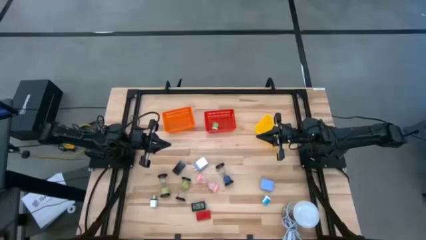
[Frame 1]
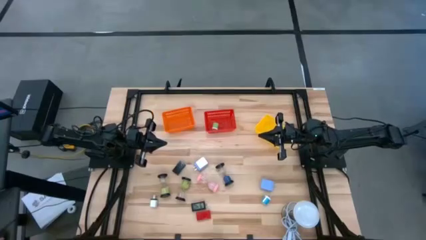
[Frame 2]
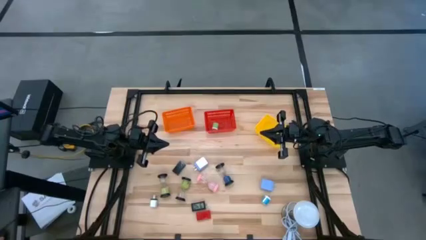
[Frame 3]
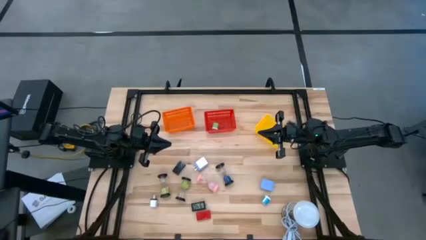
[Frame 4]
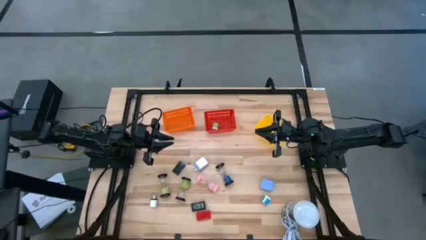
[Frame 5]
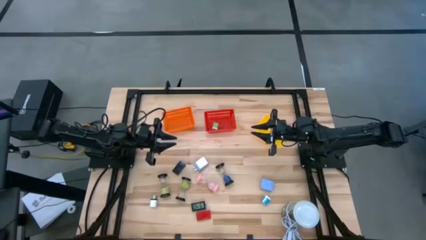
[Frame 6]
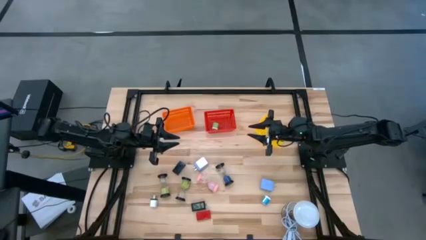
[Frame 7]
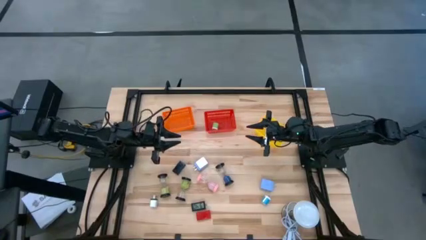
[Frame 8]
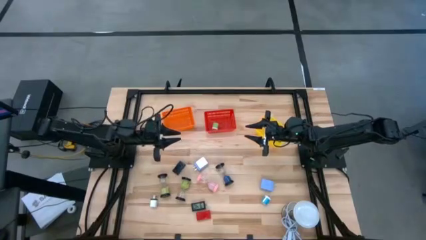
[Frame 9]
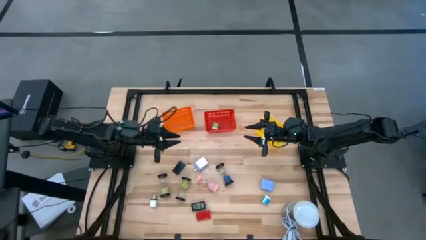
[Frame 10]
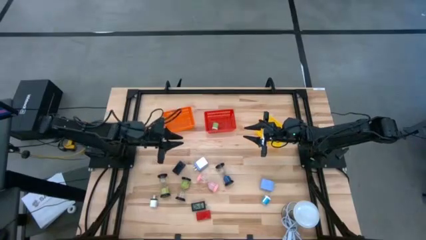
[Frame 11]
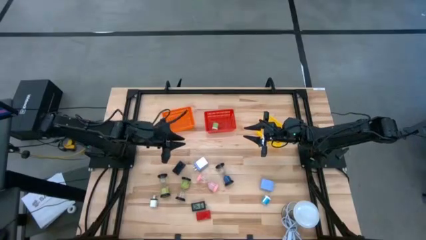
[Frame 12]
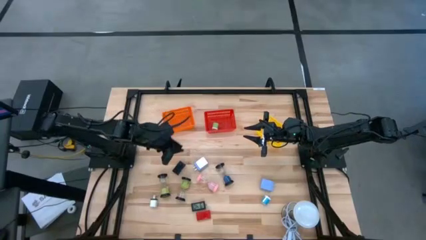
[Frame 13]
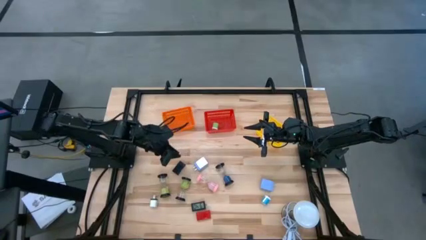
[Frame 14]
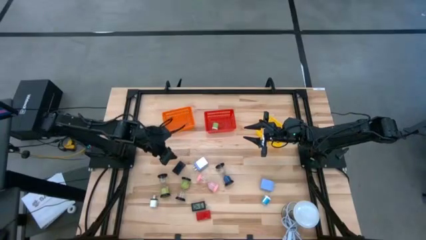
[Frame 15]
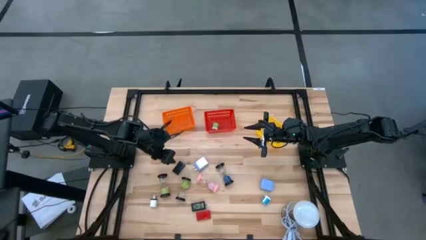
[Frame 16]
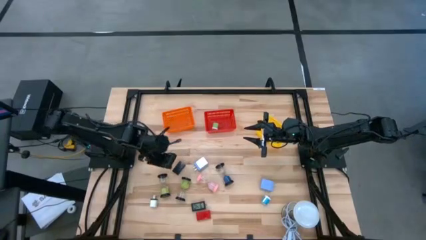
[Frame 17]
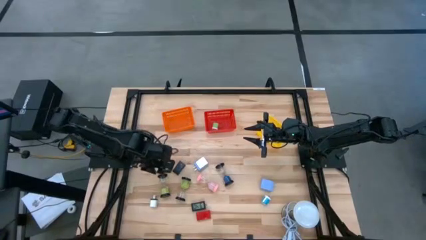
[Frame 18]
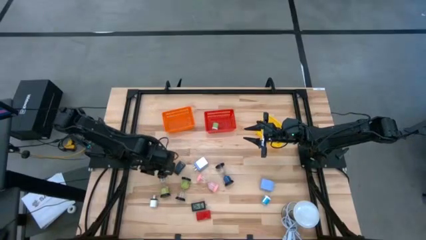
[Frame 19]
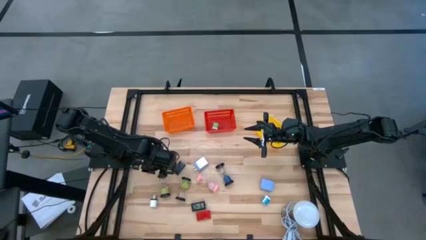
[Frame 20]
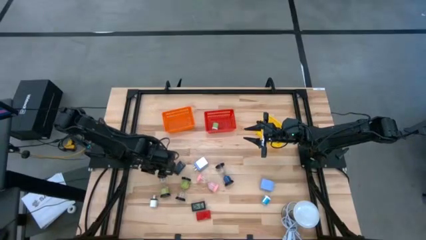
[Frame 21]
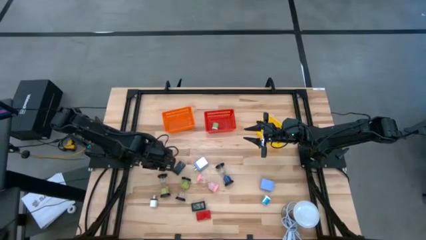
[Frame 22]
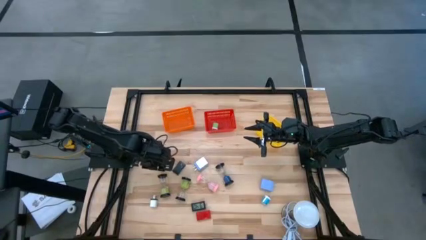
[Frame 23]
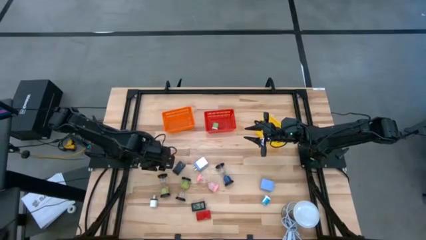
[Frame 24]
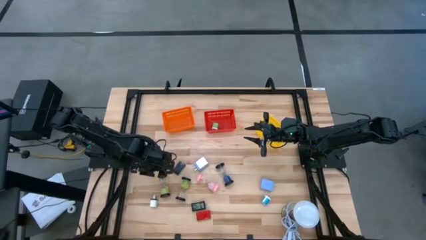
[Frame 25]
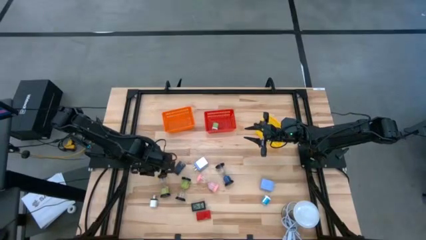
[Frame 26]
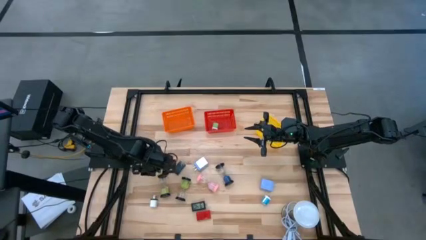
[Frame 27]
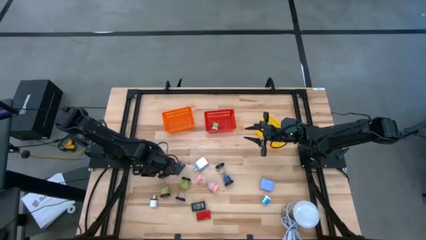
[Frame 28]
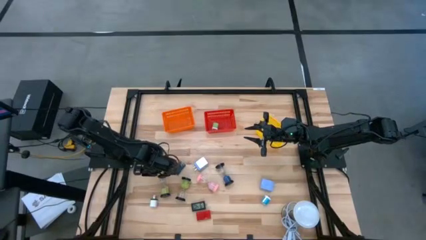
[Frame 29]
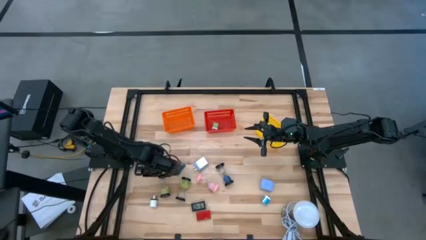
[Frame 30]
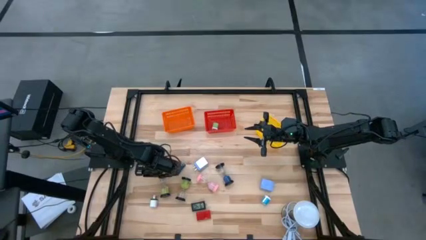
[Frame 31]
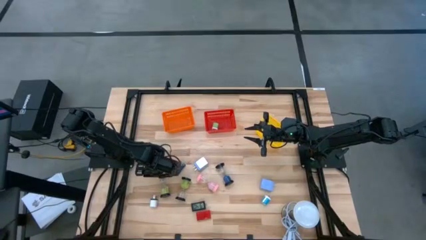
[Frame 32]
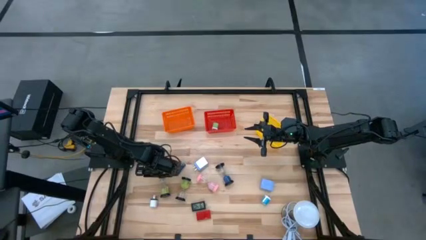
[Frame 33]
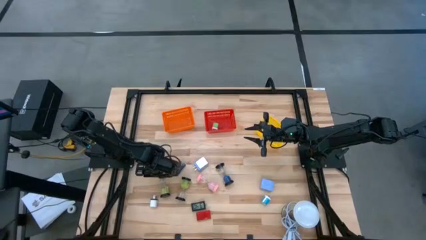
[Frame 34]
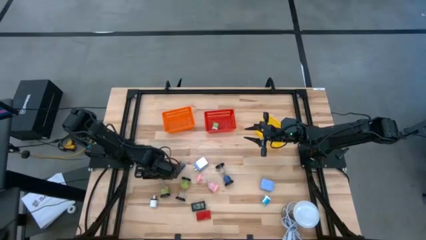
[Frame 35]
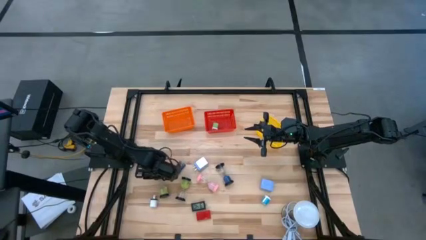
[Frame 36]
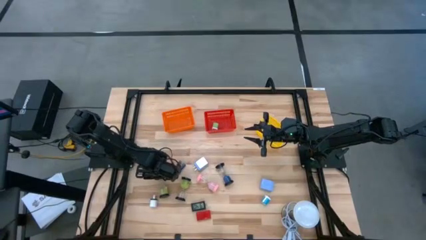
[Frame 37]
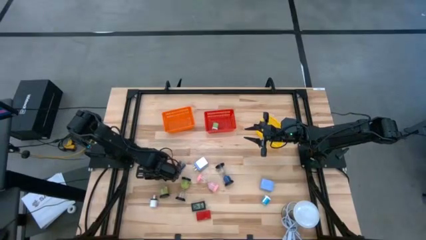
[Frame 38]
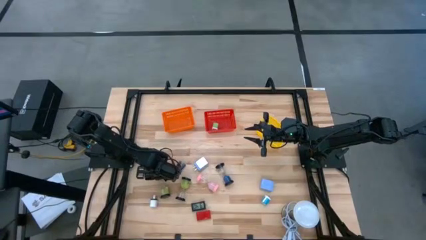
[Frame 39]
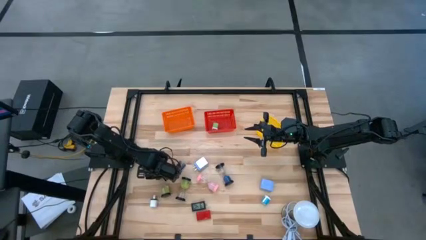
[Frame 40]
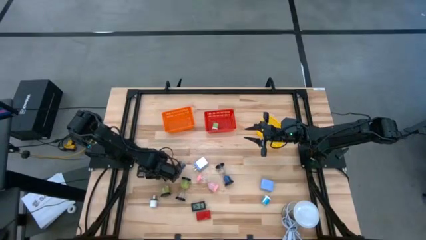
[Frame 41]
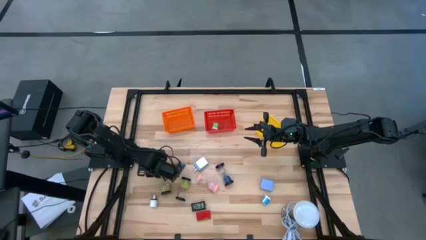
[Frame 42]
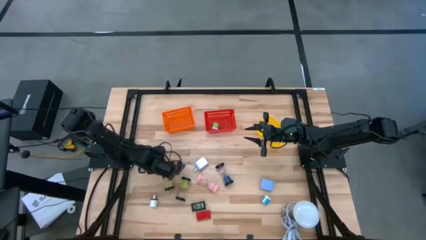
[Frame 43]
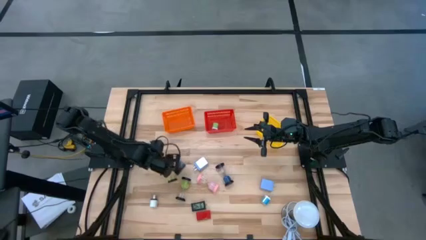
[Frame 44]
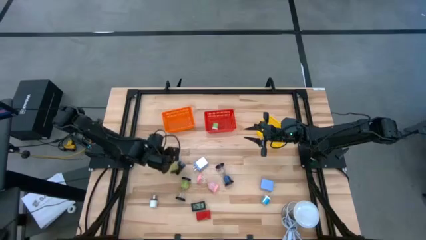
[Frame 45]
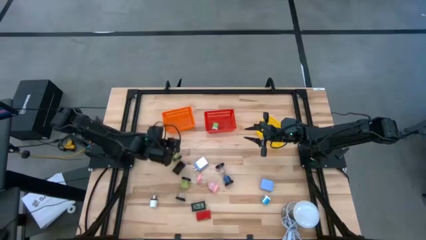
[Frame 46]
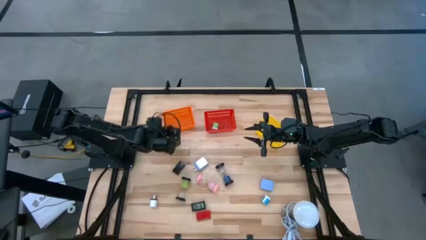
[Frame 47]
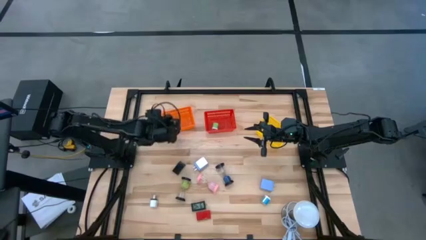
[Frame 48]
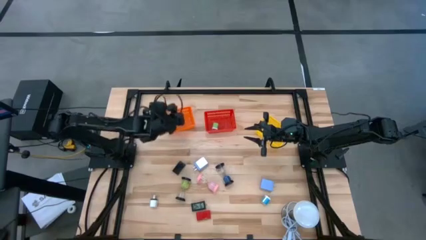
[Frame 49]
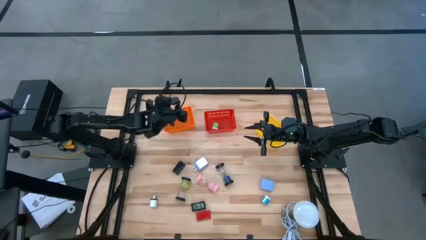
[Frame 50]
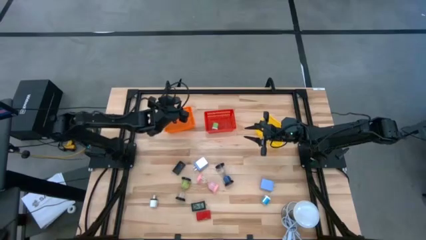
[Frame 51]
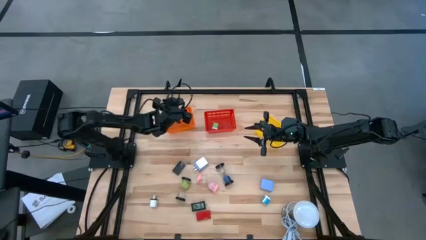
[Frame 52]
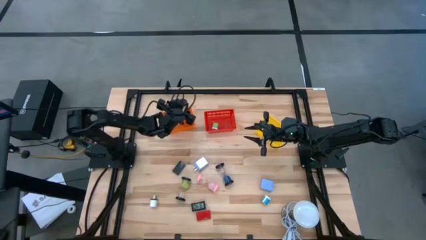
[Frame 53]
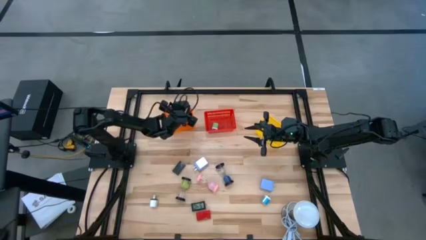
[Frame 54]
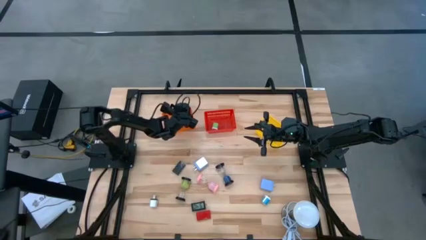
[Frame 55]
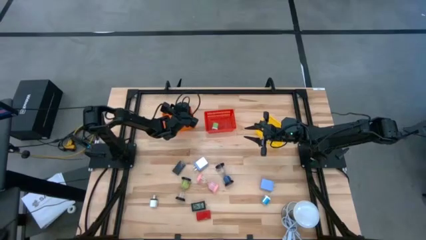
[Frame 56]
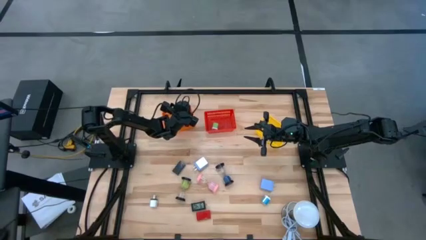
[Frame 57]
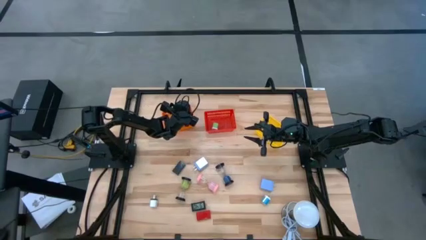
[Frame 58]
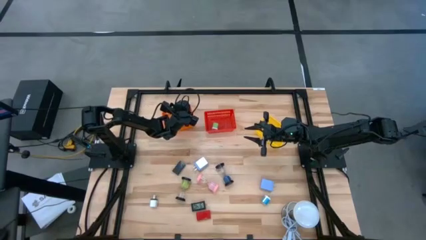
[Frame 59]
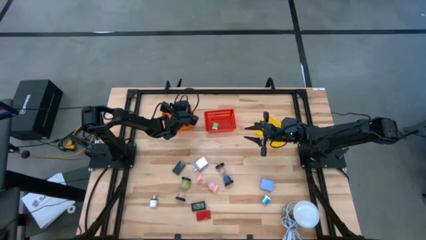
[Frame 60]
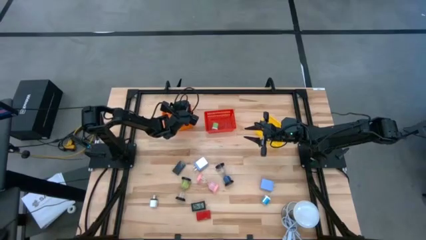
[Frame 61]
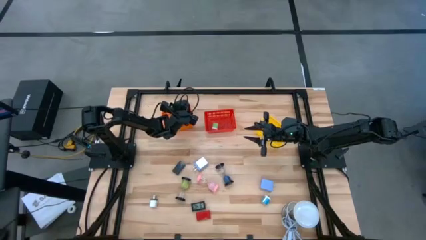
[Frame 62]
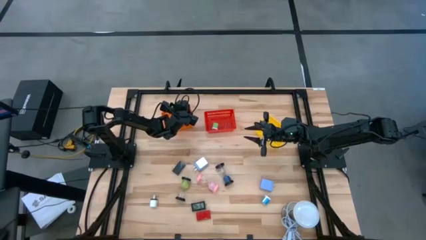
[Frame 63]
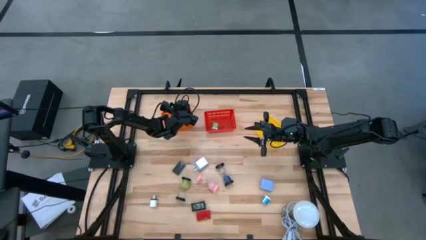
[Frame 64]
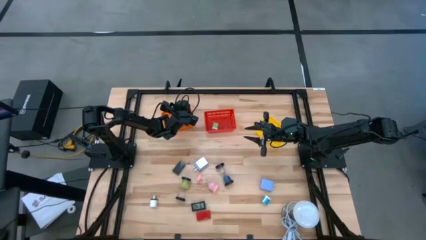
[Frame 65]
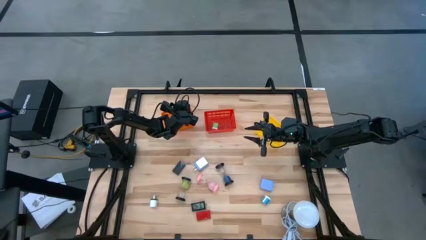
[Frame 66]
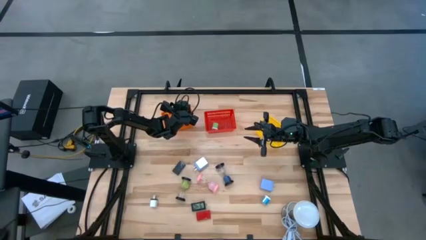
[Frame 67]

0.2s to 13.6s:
Task: Pick & Place Office items
Put the left green hourglass into the orange bin
